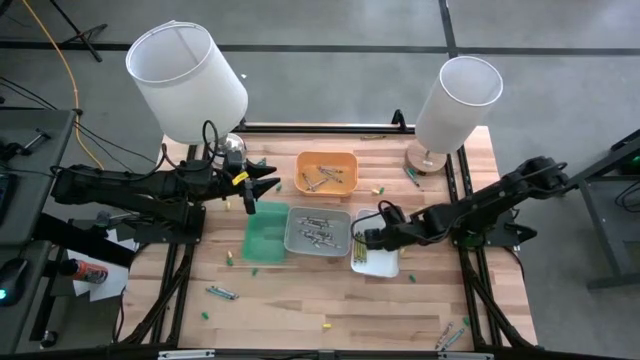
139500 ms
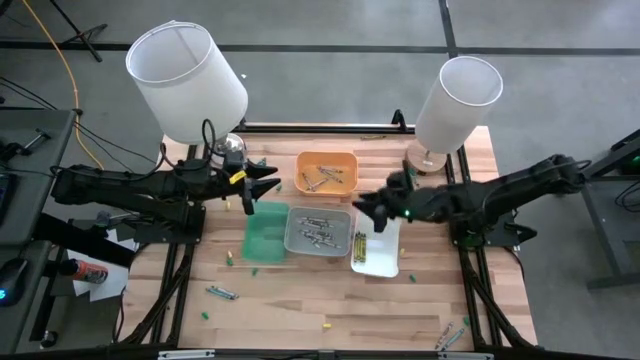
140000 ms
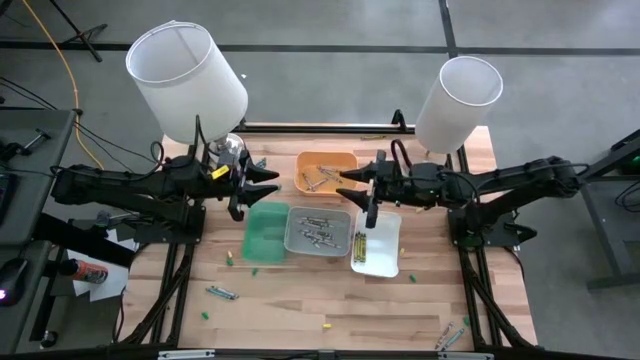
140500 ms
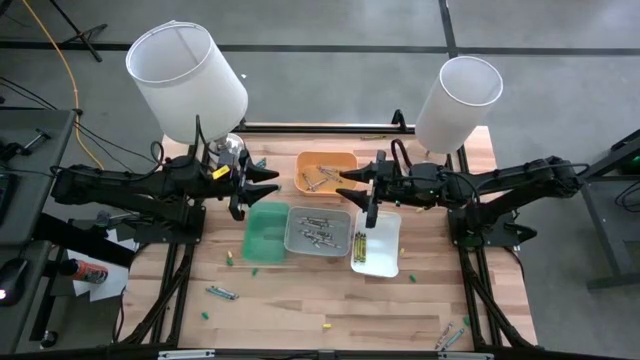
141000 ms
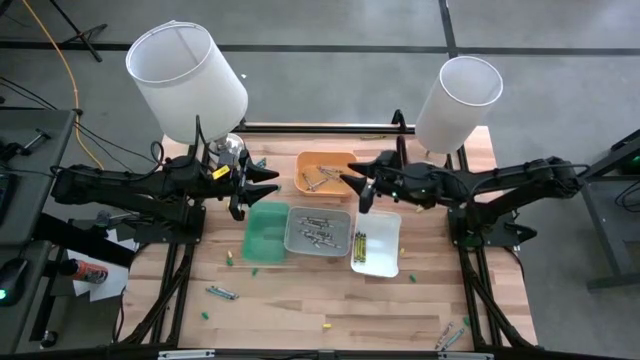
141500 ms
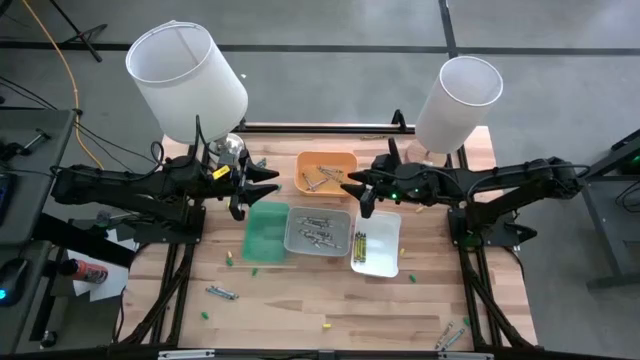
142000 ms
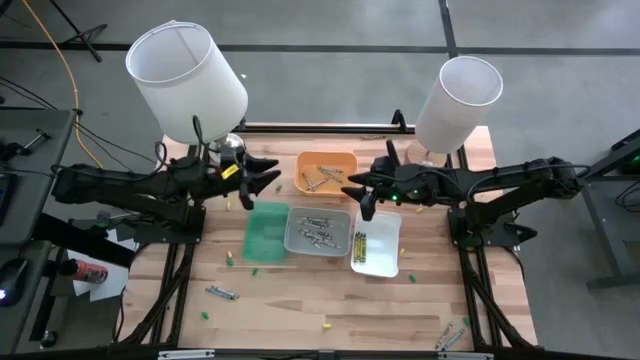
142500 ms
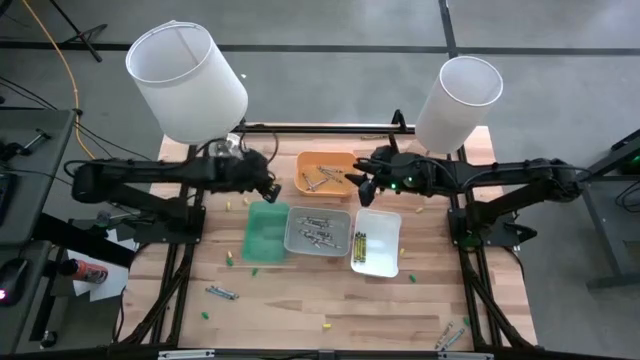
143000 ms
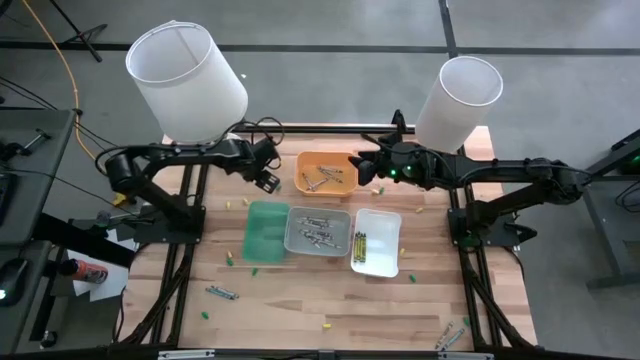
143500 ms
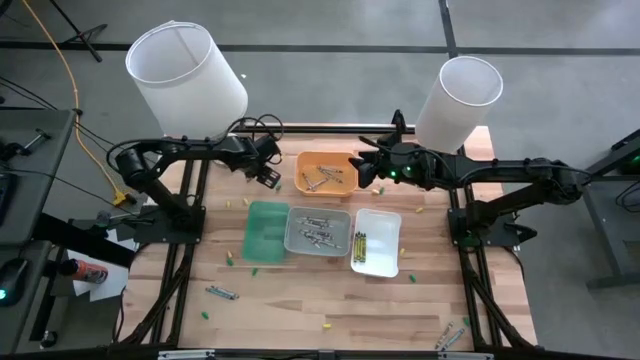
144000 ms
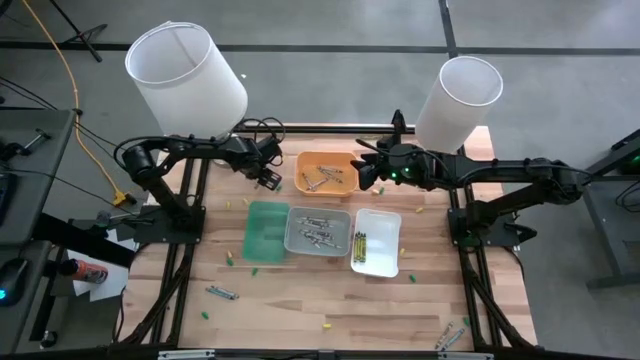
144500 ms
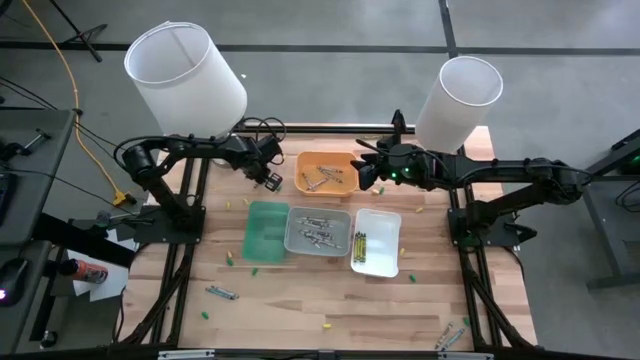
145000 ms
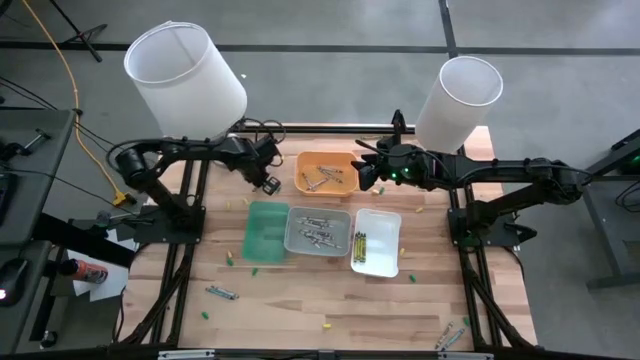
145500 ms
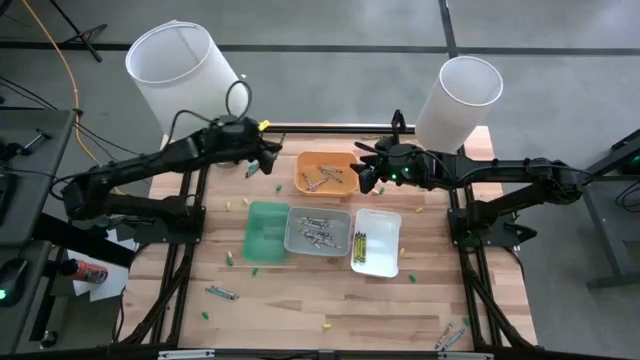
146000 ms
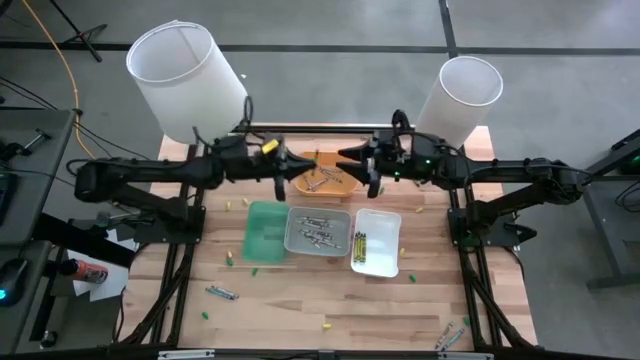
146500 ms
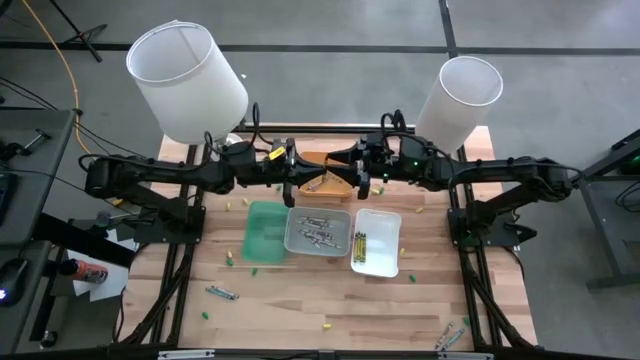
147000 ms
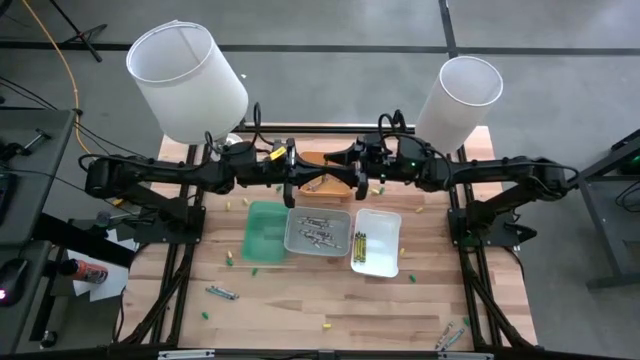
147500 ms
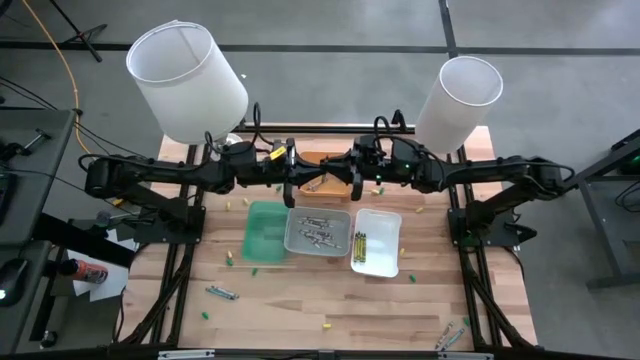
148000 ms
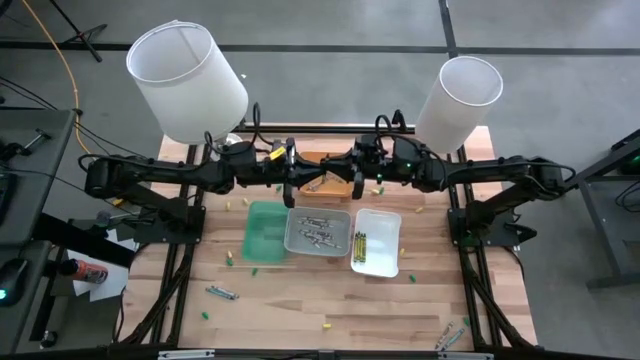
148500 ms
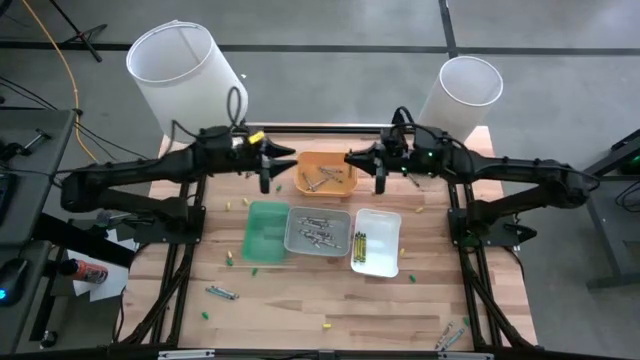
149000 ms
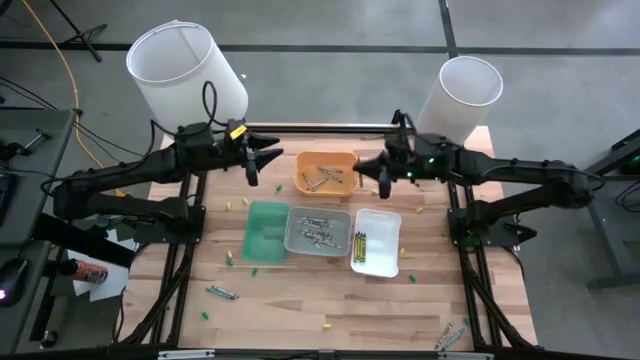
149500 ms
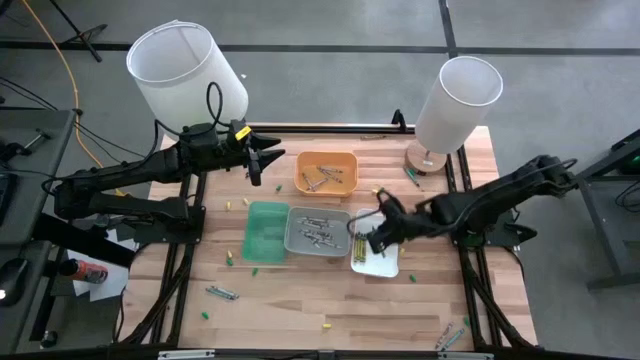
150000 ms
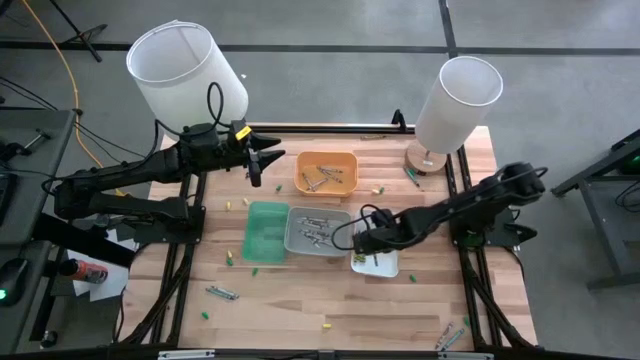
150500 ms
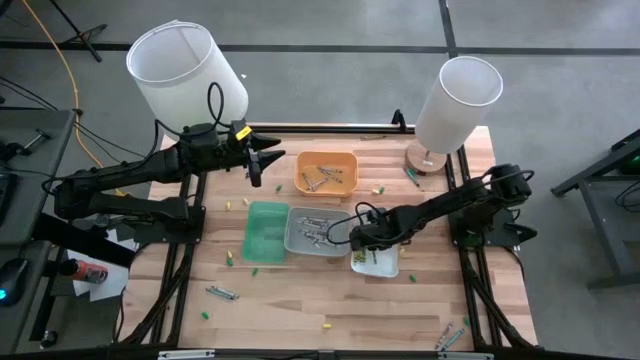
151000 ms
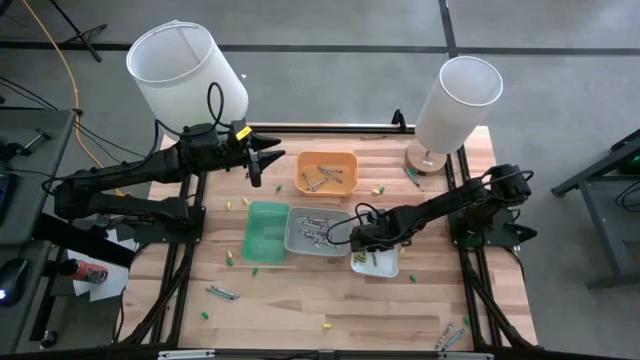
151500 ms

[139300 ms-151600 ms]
Task: Sort crayons
Put the green crayon into the white bin

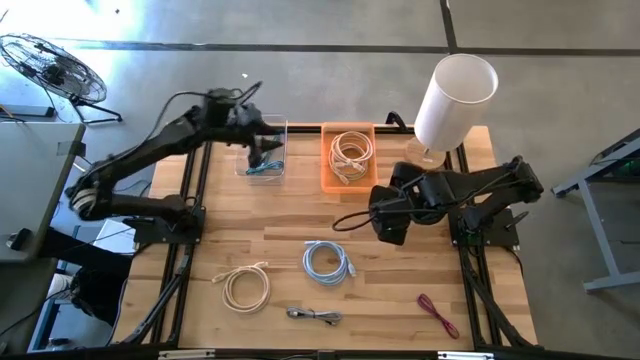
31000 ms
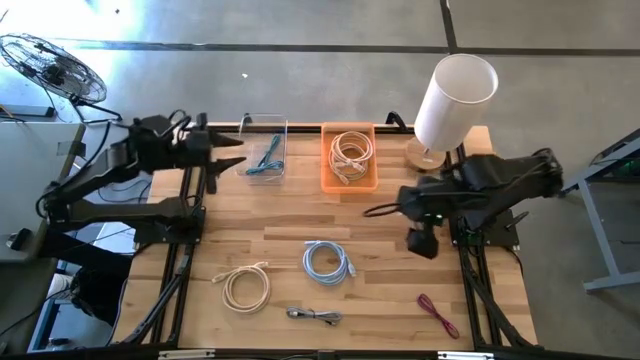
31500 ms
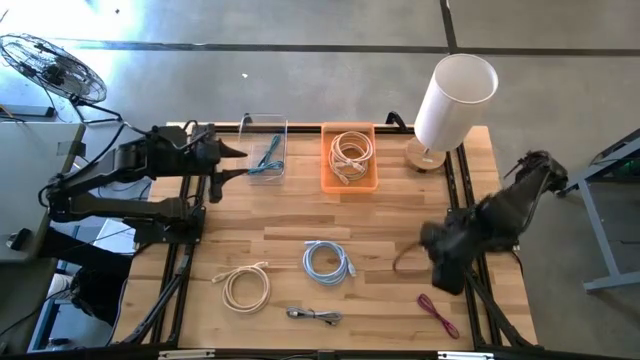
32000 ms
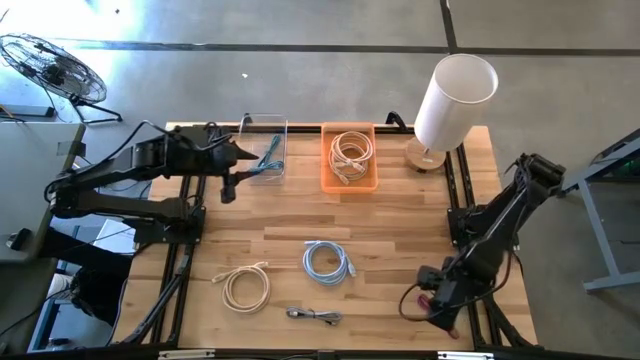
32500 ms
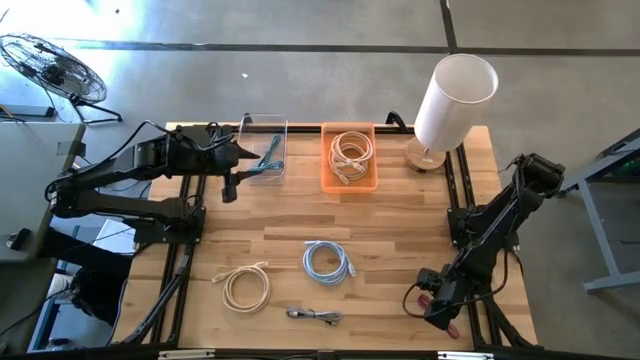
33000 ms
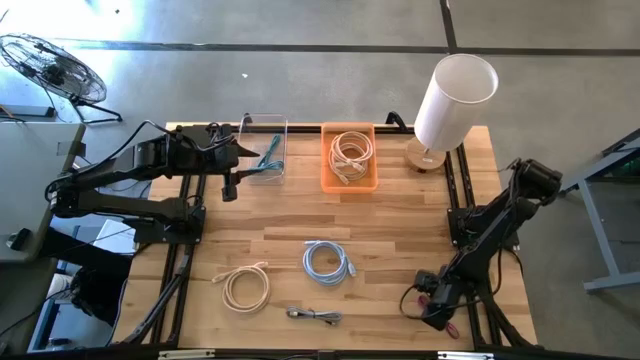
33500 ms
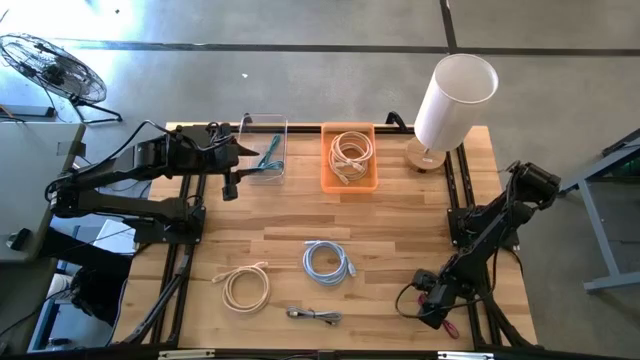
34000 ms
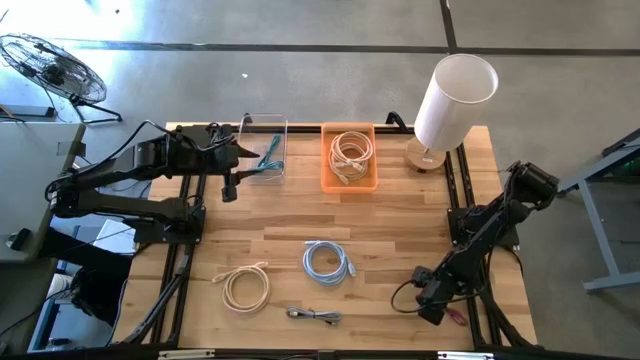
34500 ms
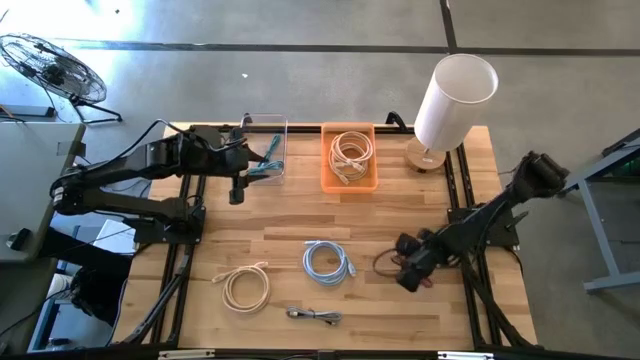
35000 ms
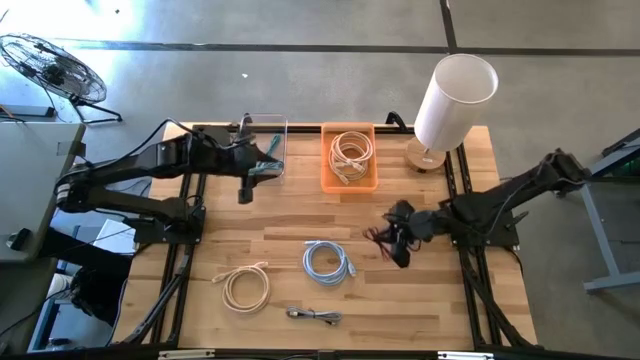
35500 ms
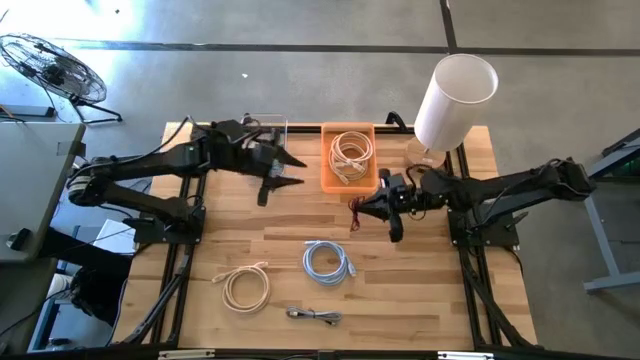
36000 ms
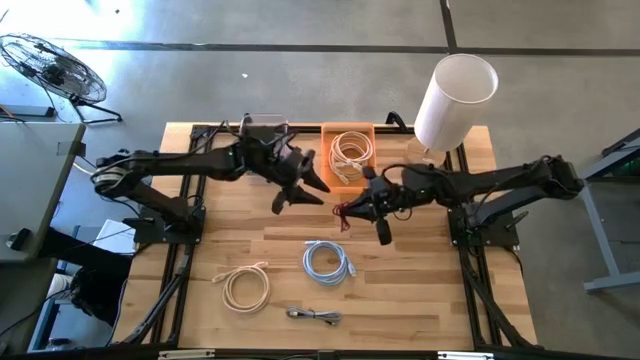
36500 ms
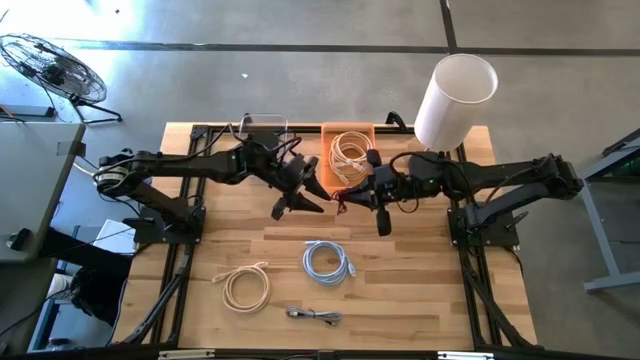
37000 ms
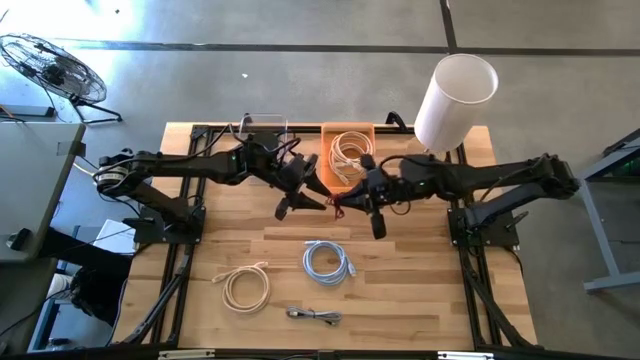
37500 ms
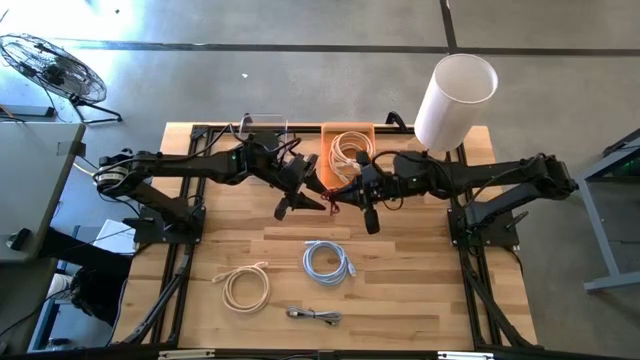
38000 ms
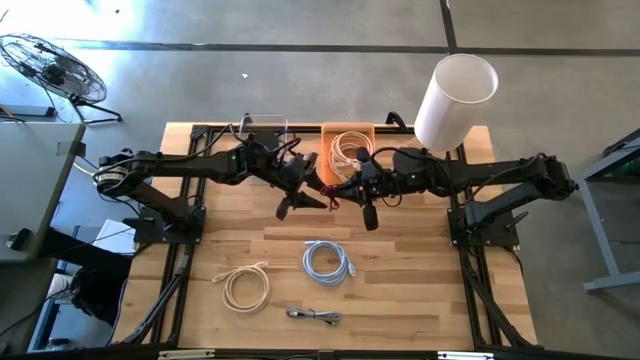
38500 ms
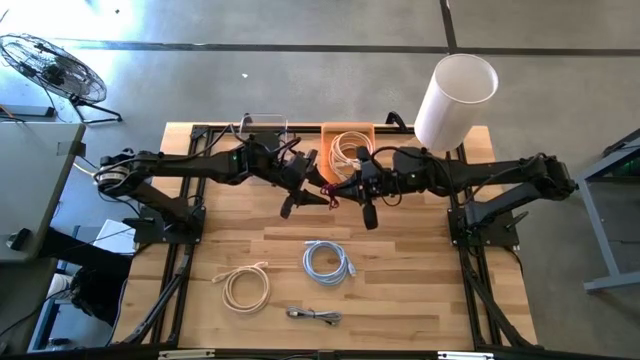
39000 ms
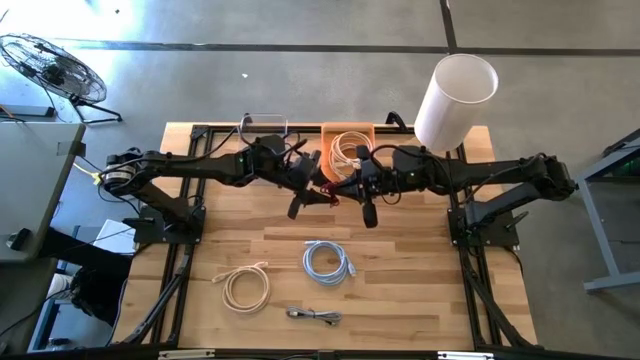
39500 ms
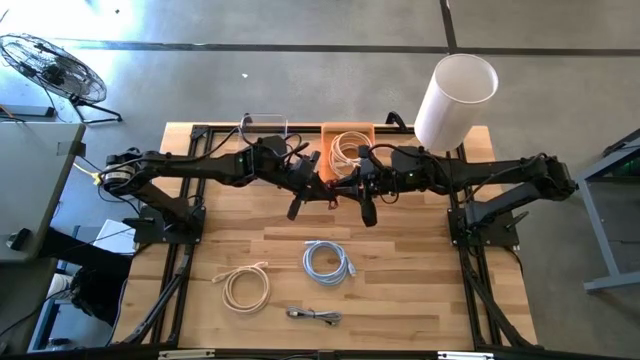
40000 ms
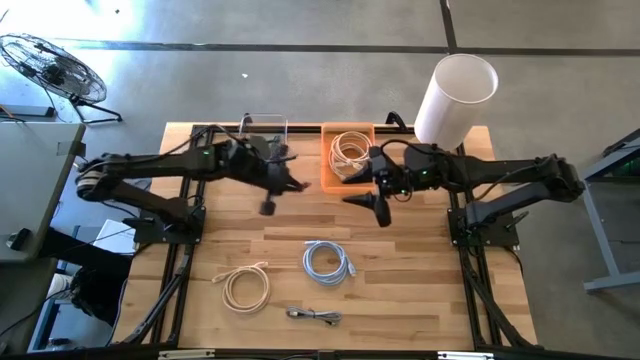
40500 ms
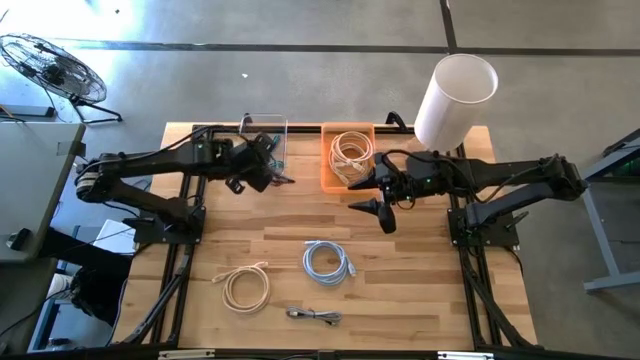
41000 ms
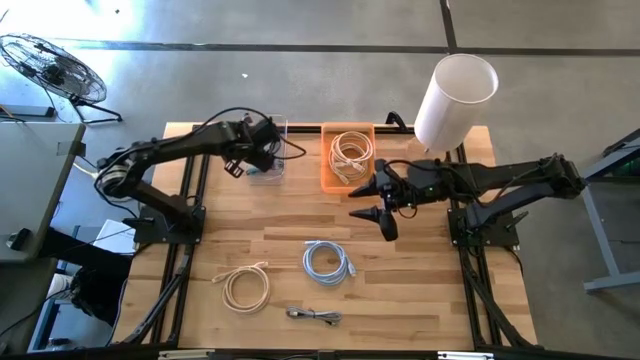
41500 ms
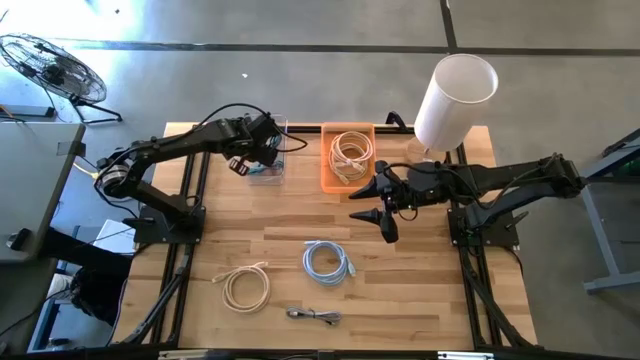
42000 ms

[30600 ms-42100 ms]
Task: Pick & Place USB Port
Put the pink and black charger cable into the transparent bin
